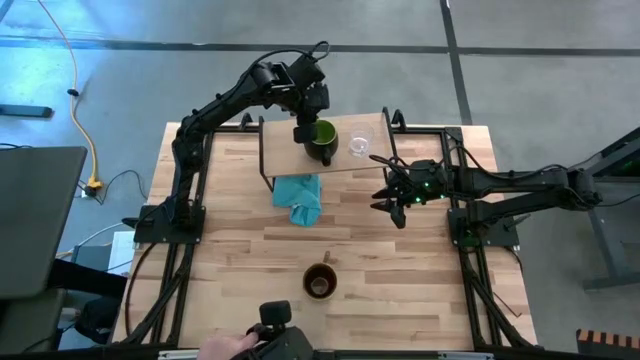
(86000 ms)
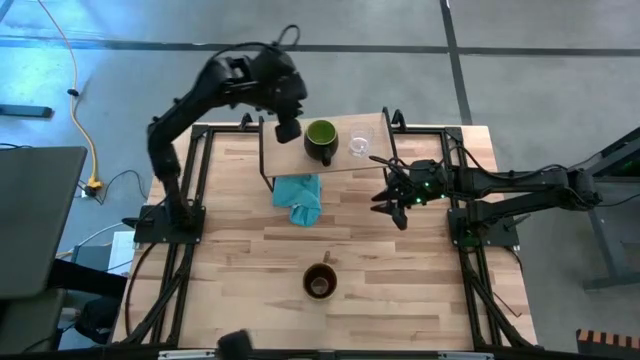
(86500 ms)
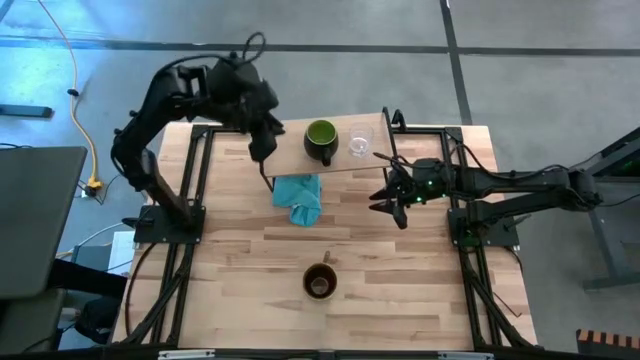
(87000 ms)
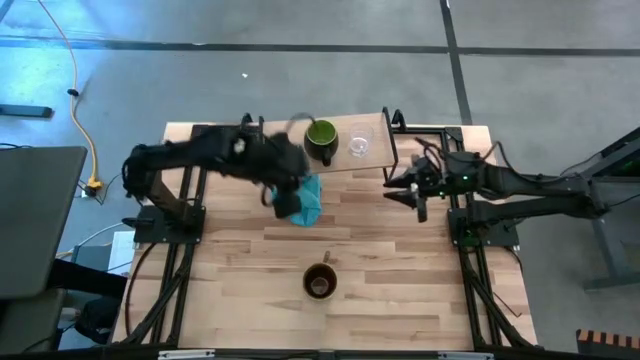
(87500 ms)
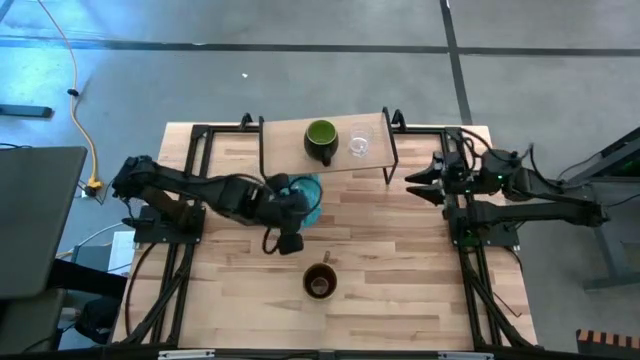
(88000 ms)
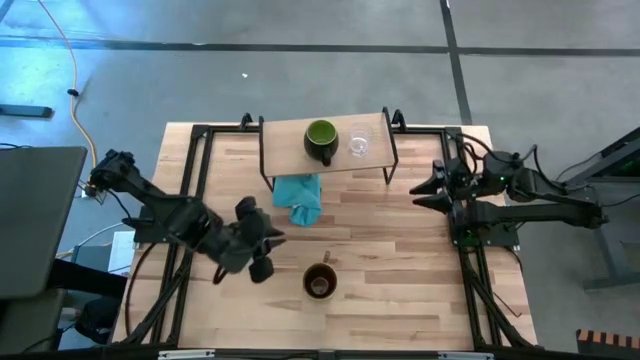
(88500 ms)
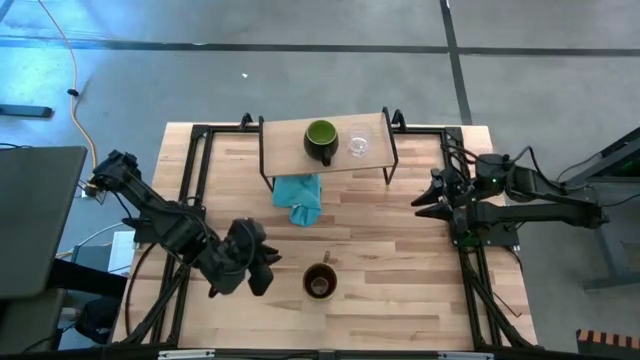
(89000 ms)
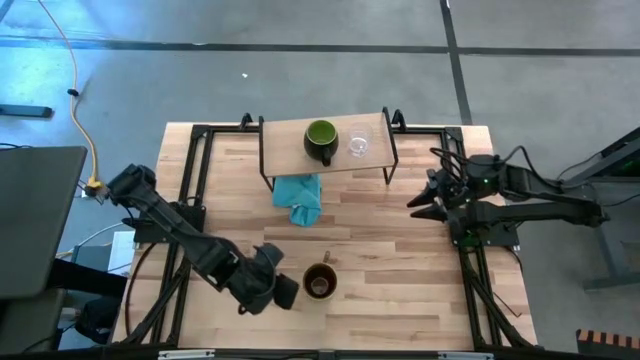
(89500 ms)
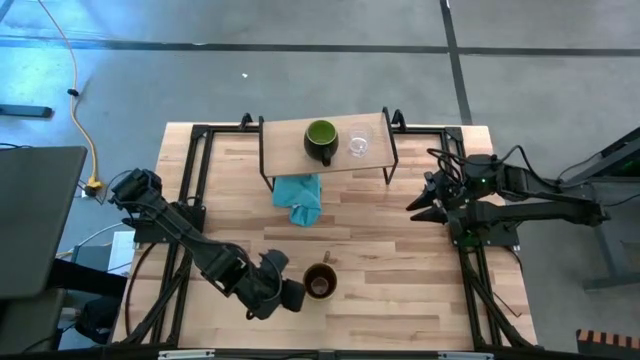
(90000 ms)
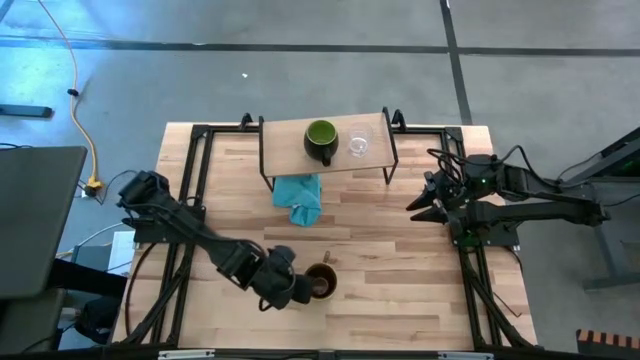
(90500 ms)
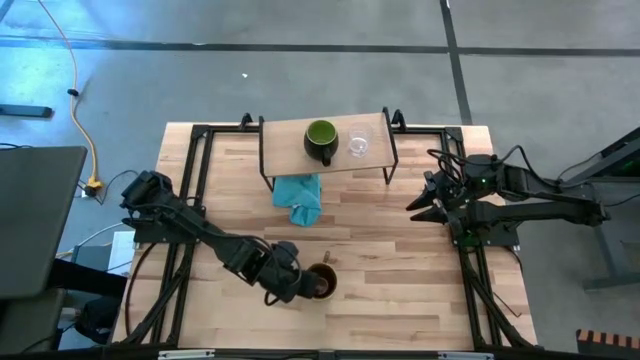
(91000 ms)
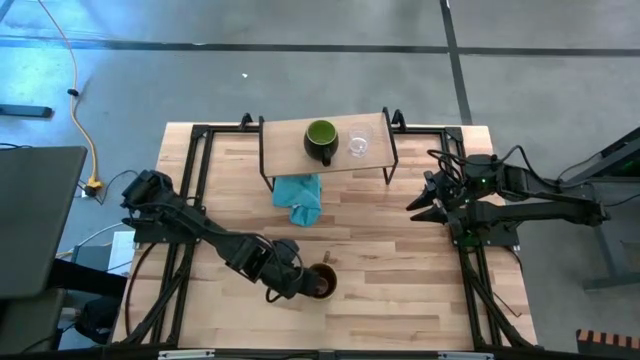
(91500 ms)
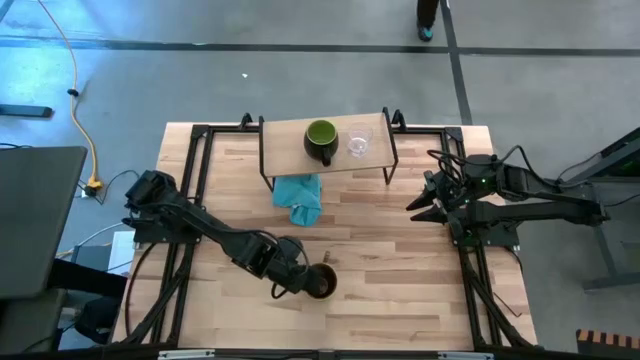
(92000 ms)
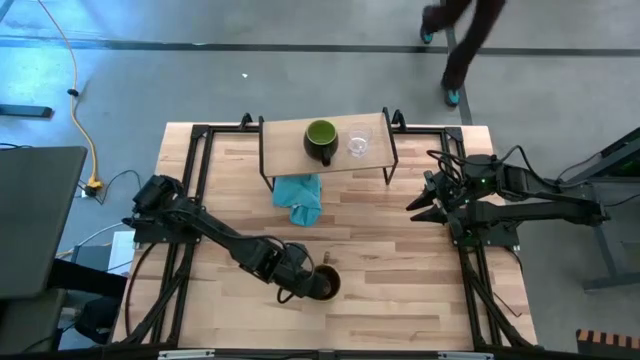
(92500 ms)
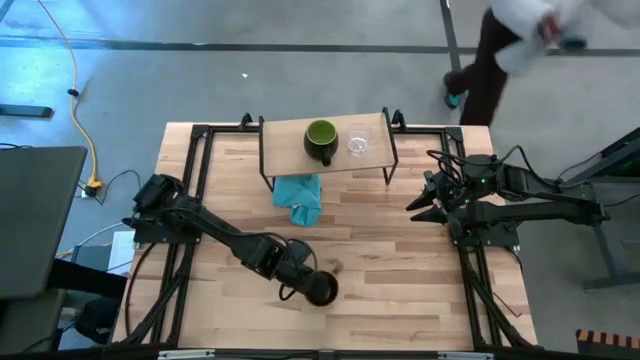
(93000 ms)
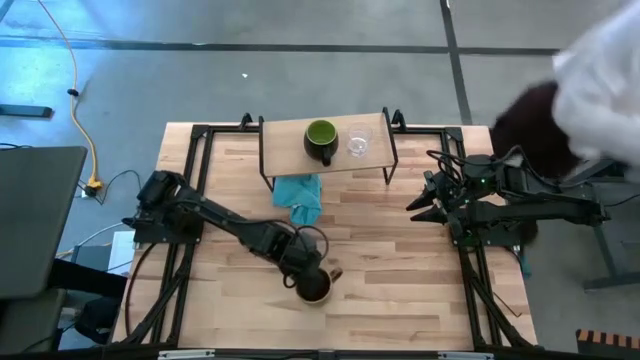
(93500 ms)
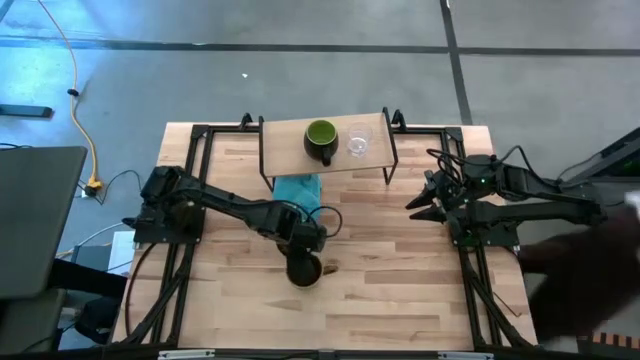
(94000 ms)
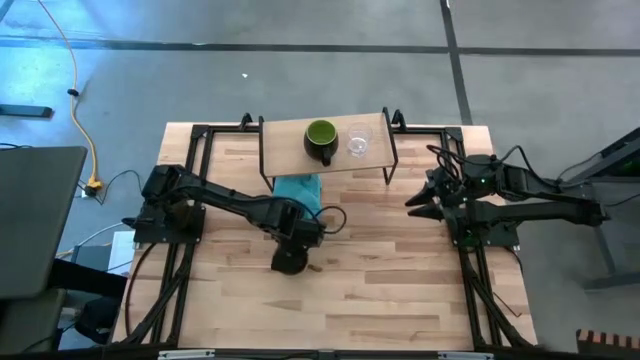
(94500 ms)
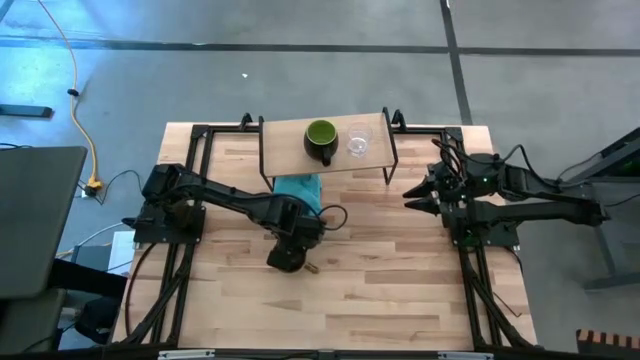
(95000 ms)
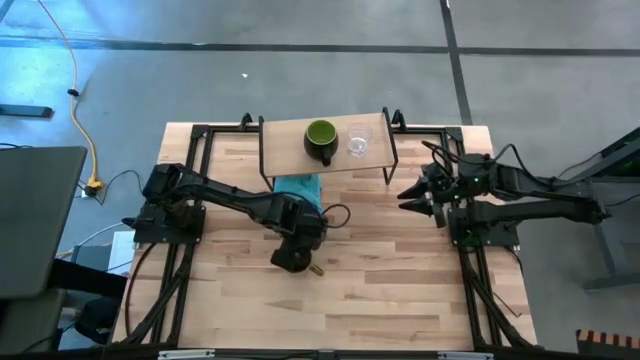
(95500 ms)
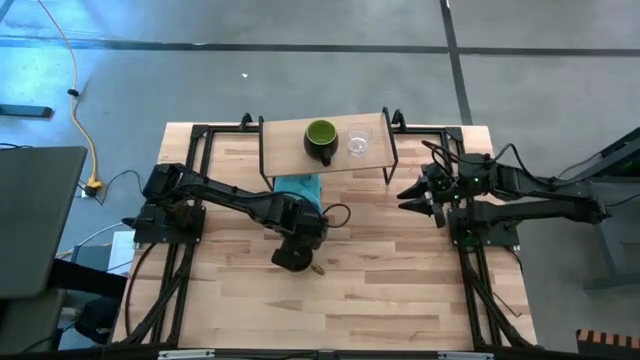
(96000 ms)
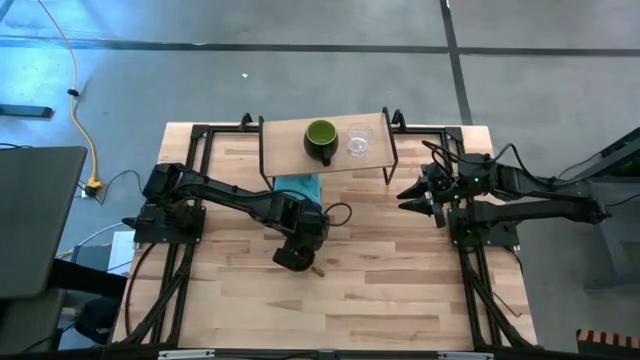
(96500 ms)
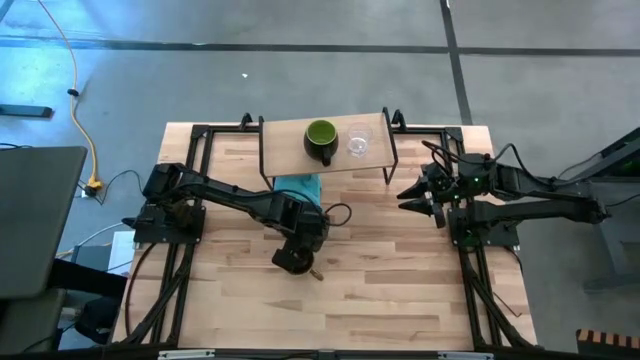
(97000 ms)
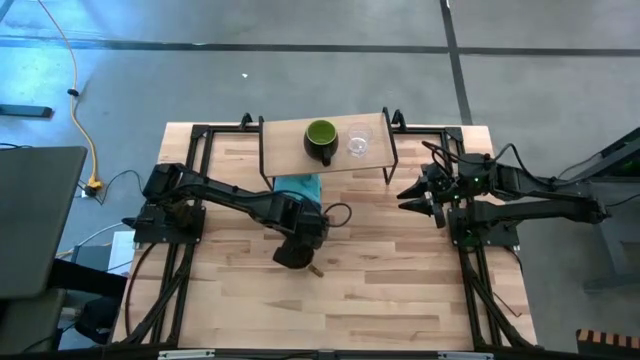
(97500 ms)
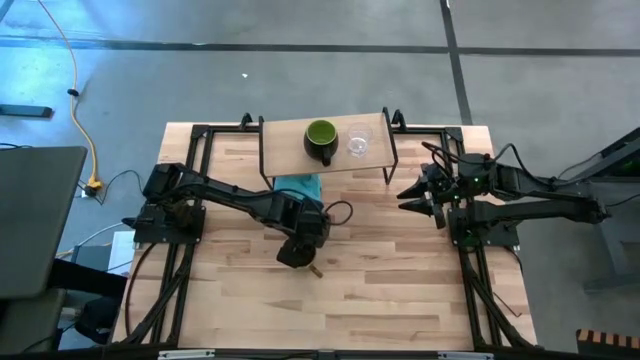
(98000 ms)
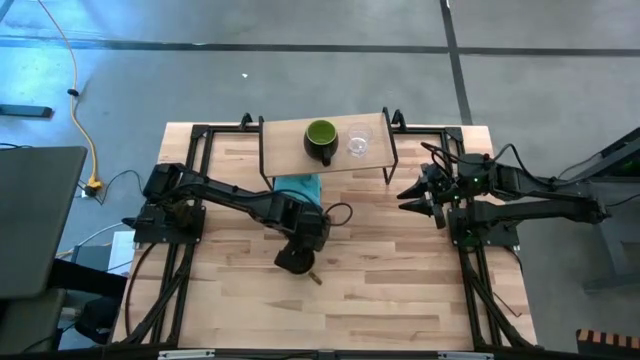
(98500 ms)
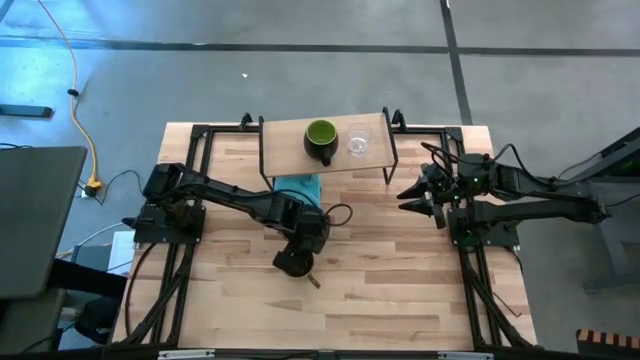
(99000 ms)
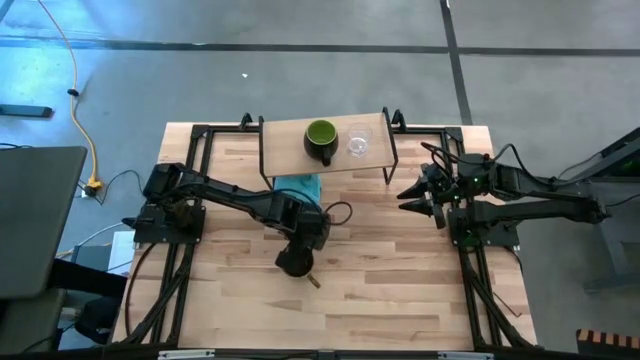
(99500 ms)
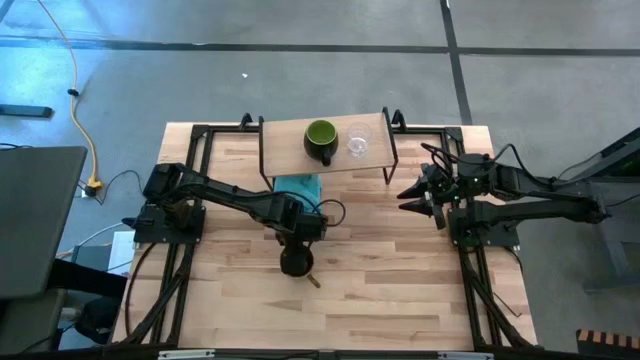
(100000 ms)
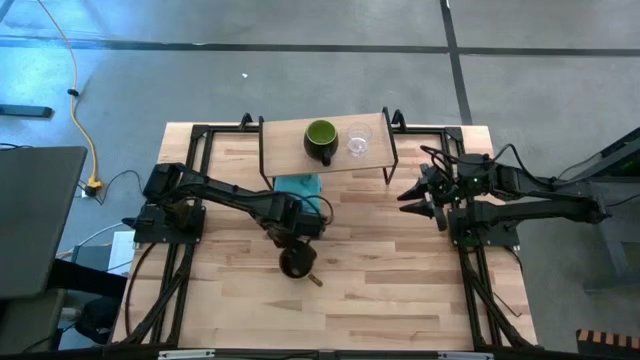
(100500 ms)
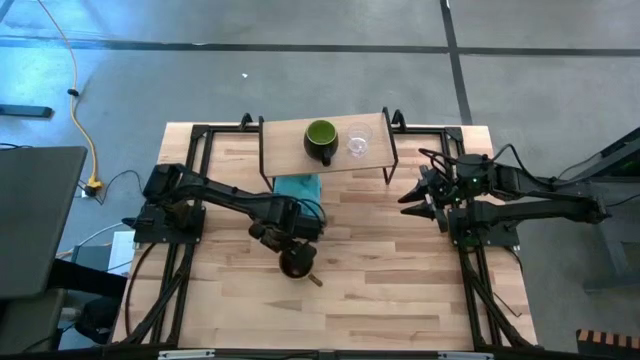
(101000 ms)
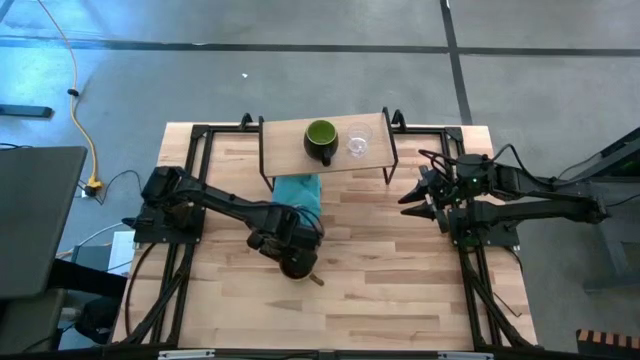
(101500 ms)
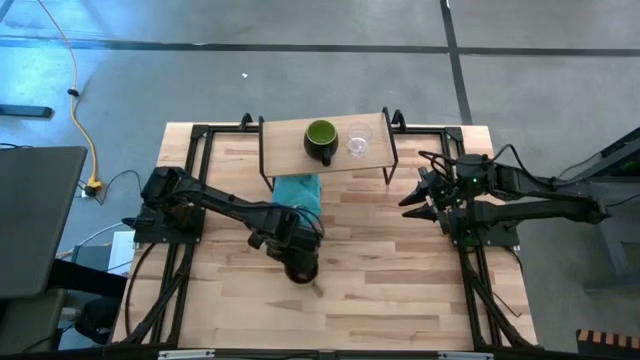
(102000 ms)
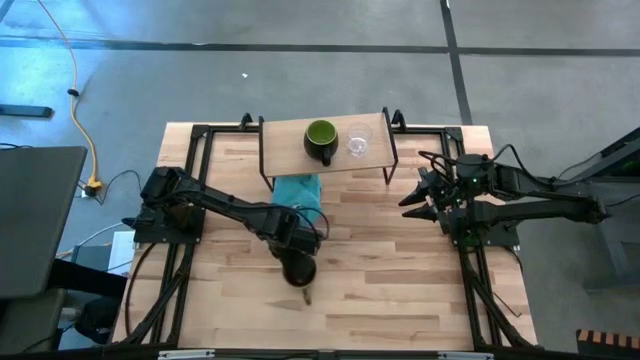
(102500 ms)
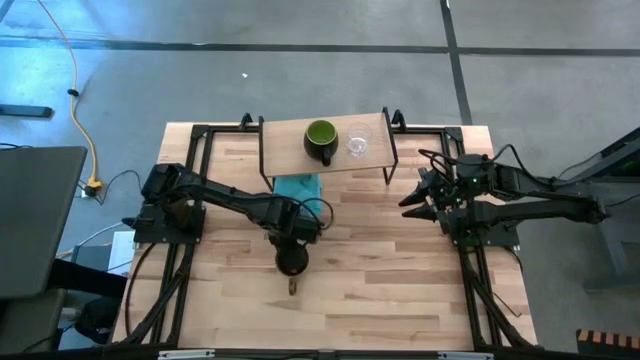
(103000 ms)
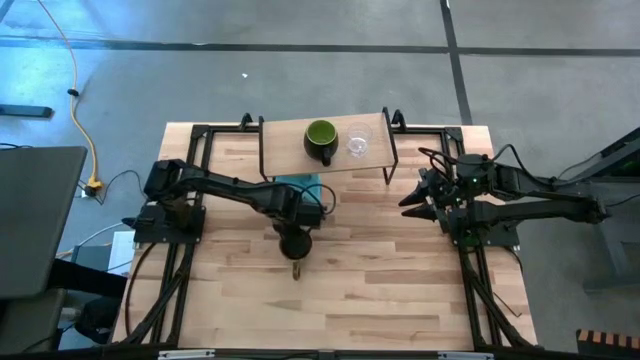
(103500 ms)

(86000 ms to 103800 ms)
Task: Stack small to large cups/mugs on shelf
Put the green mug on the shelf

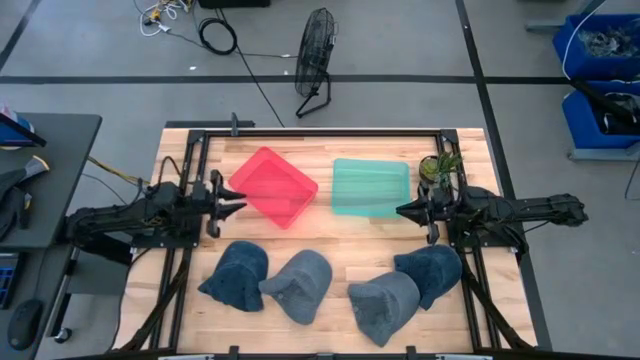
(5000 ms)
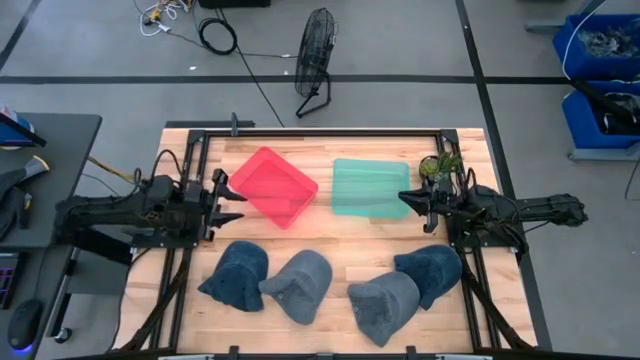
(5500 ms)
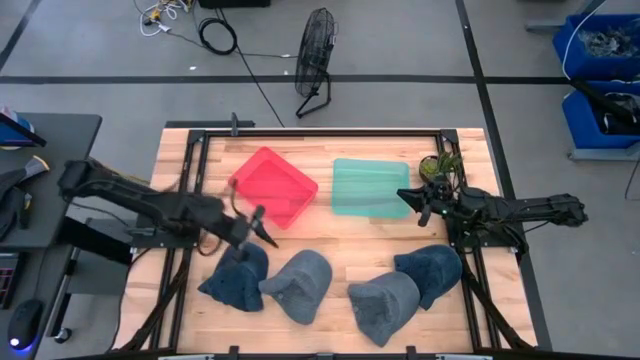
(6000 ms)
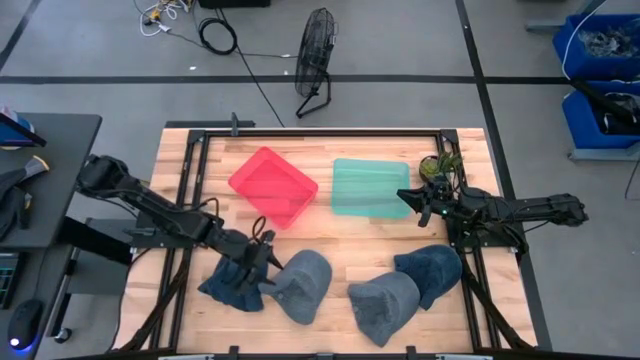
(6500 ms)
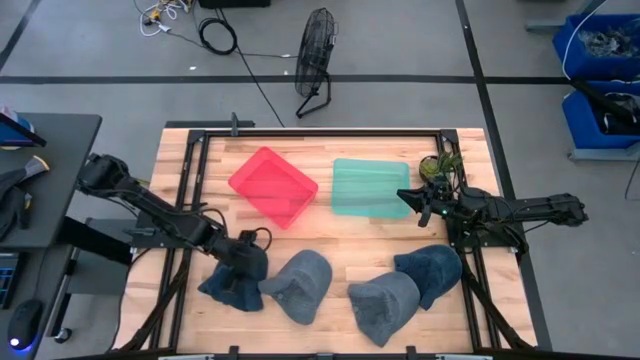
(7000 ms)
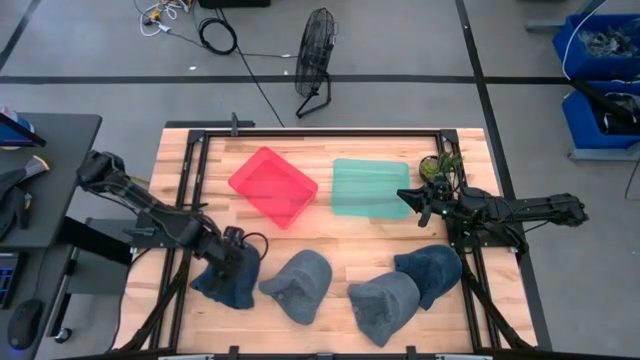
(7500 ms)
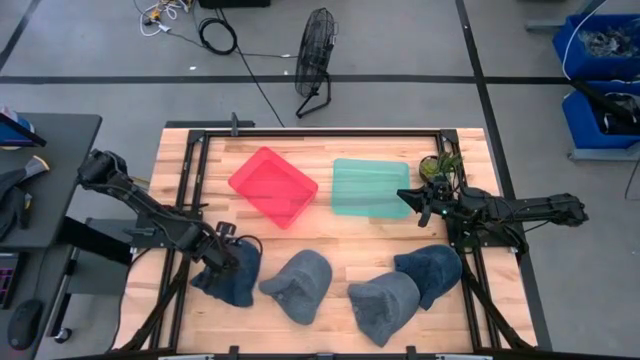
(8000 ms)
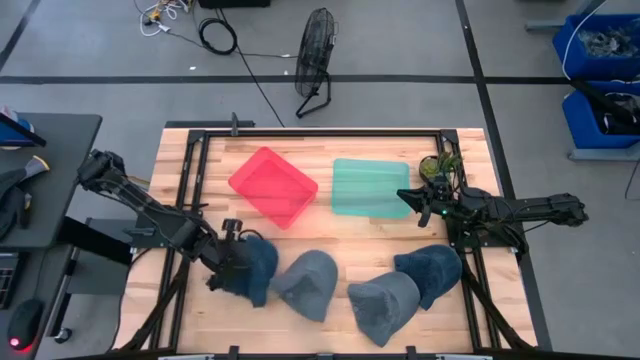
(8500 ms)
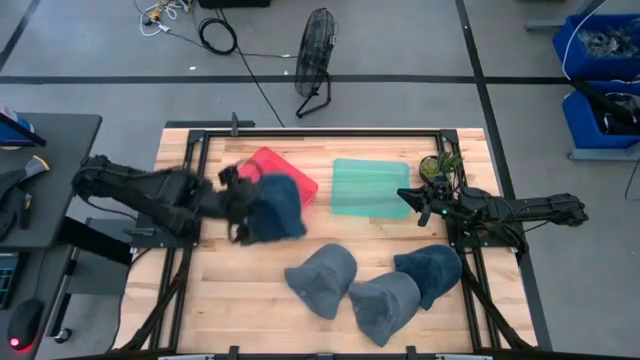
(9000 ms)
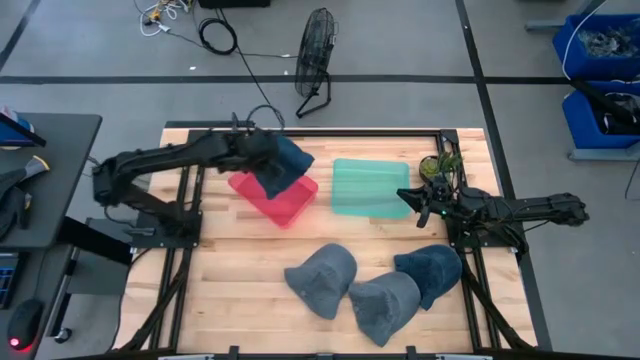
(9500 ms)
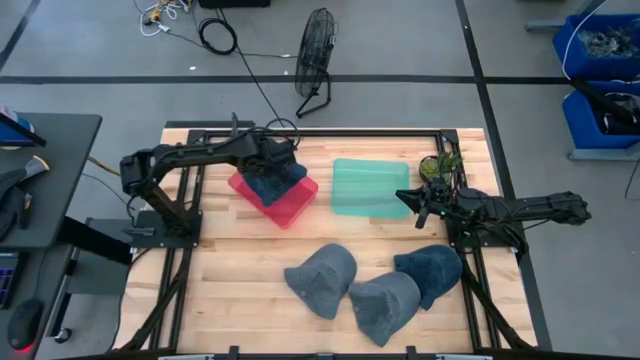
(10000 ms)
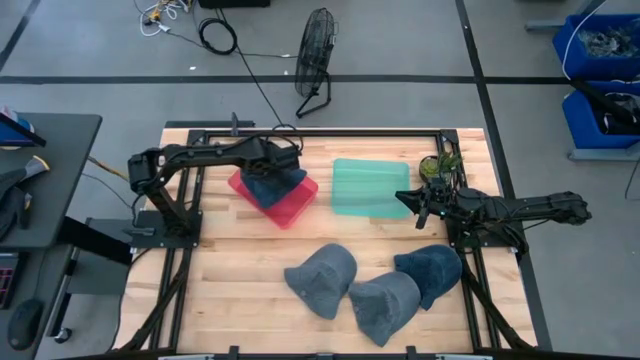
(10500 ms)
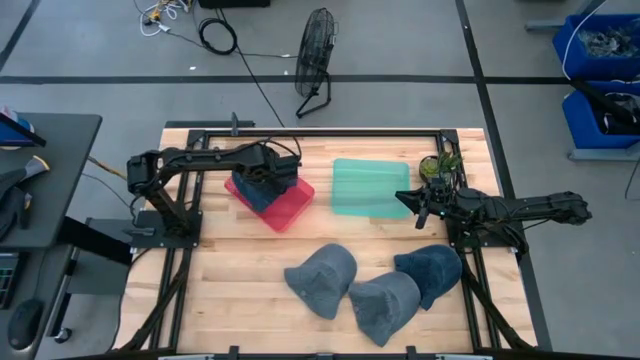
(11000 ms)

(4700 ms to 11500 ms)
Task: Pick & Place hat
Put the left blue cap into the red bin
